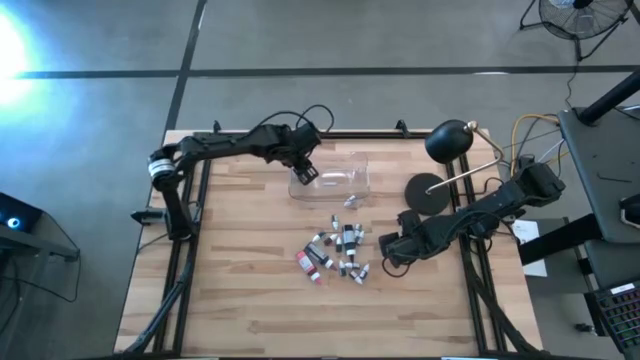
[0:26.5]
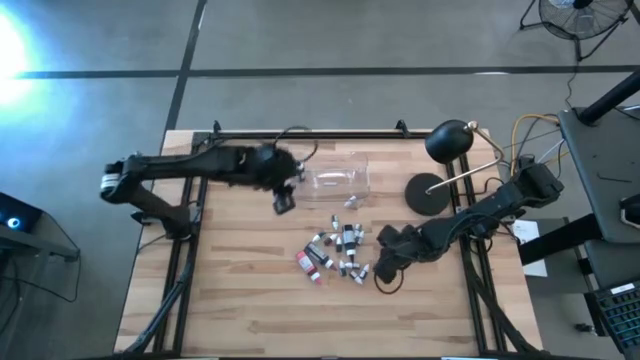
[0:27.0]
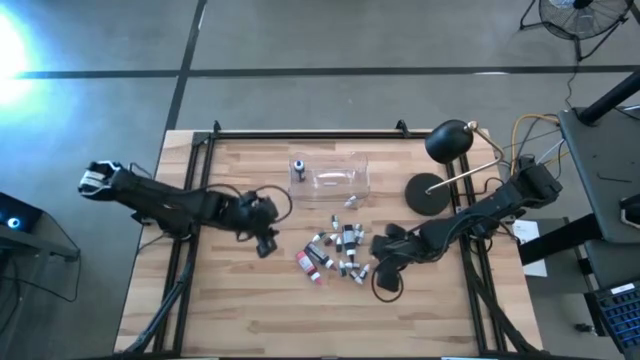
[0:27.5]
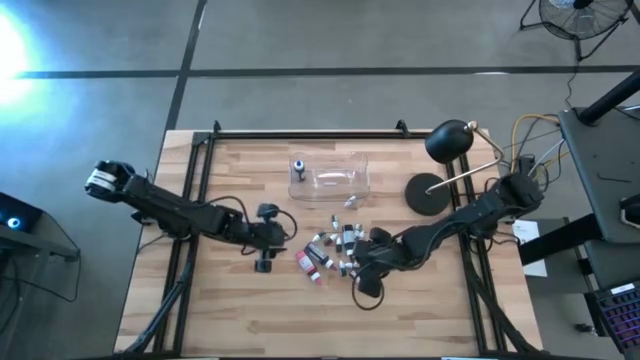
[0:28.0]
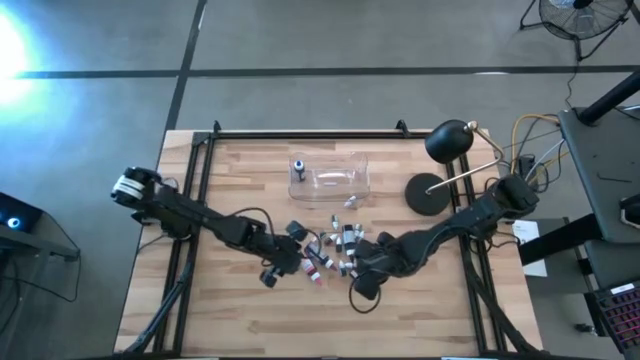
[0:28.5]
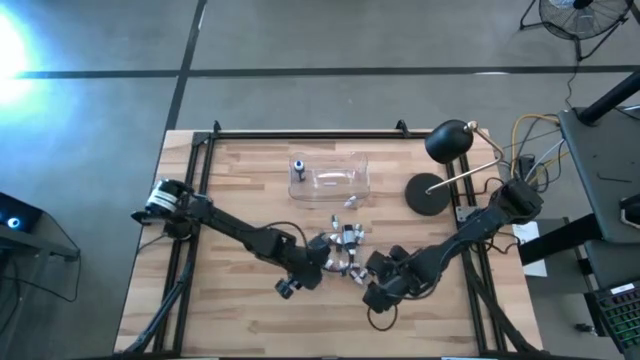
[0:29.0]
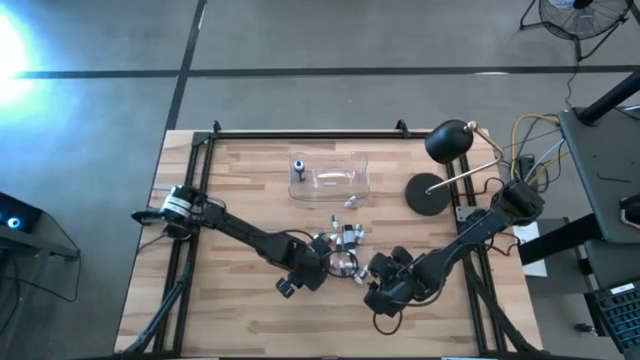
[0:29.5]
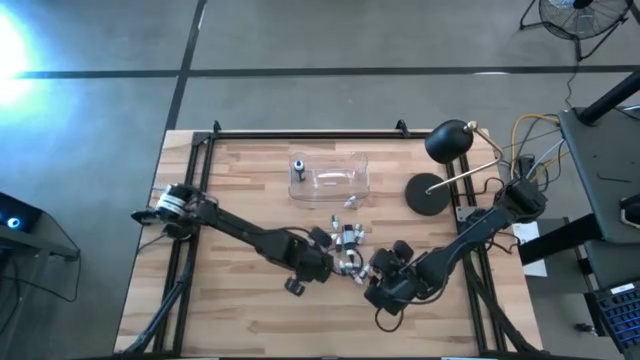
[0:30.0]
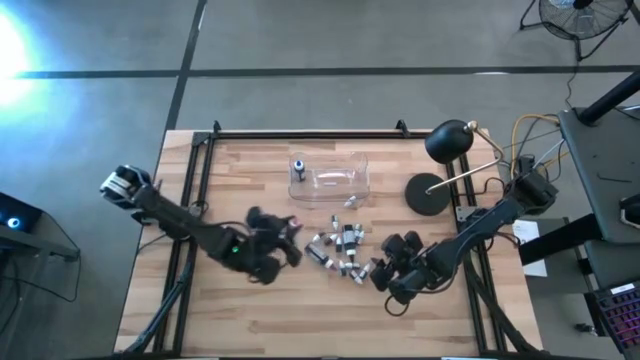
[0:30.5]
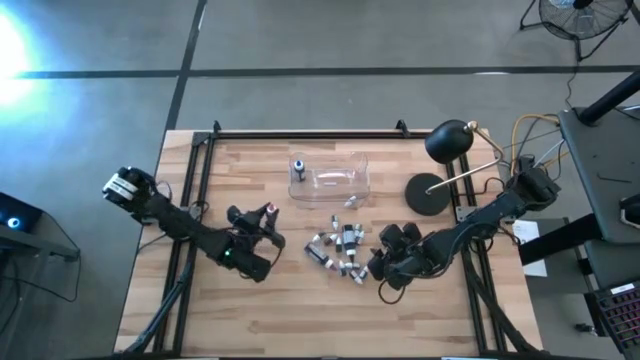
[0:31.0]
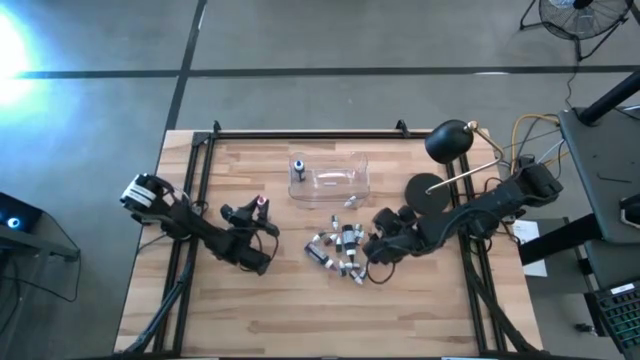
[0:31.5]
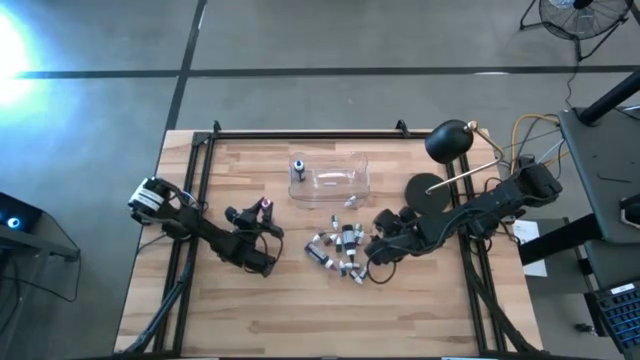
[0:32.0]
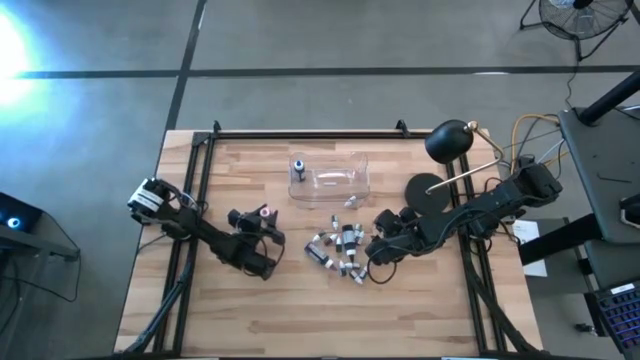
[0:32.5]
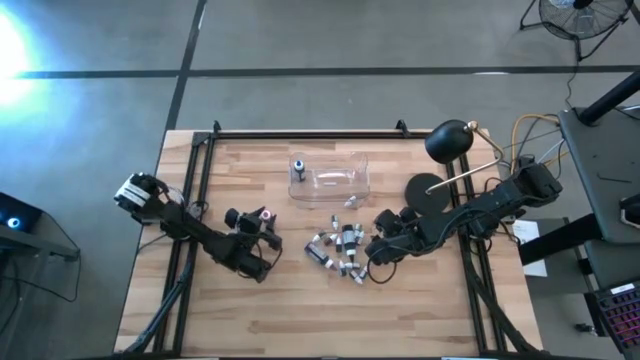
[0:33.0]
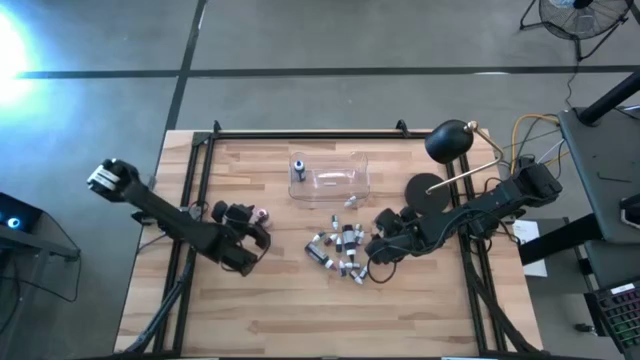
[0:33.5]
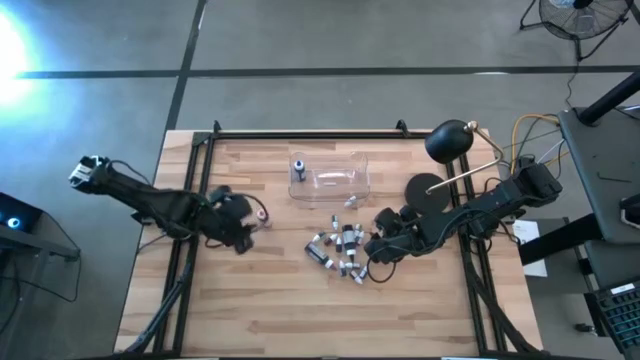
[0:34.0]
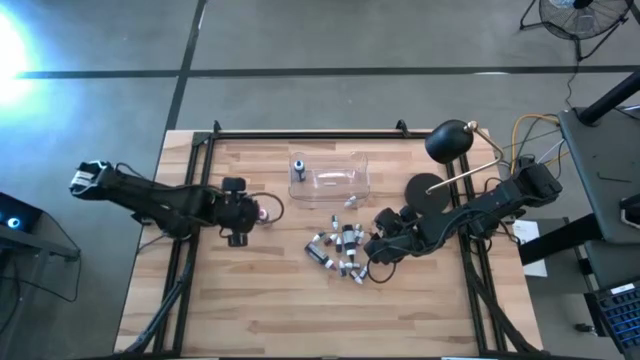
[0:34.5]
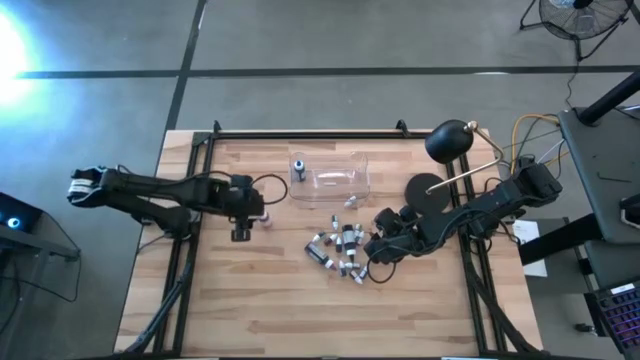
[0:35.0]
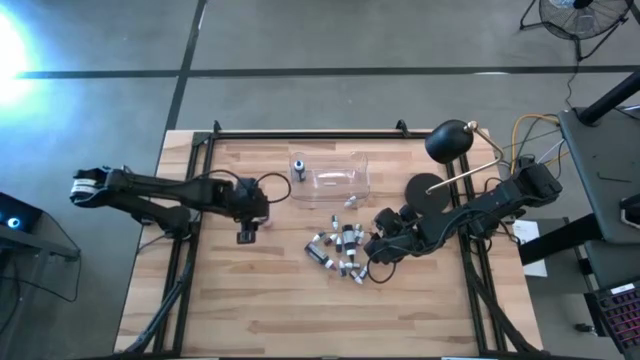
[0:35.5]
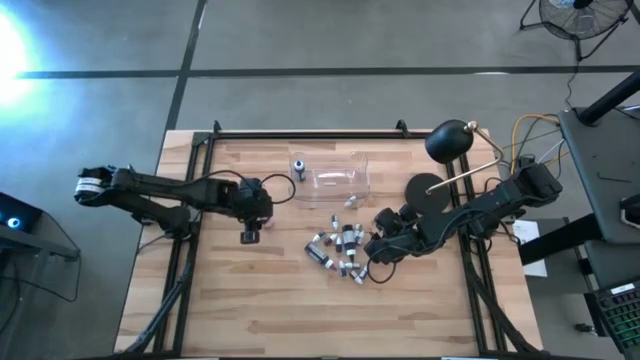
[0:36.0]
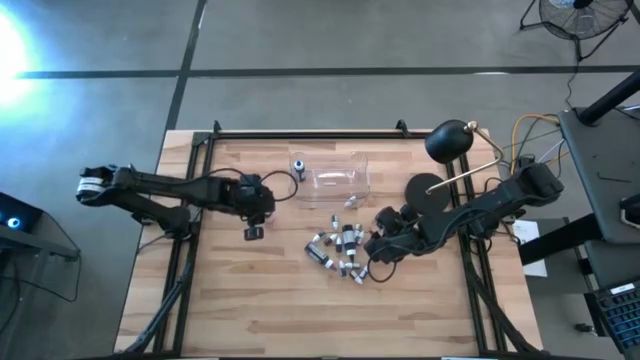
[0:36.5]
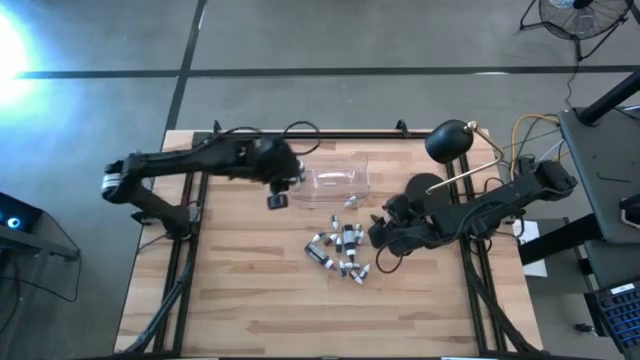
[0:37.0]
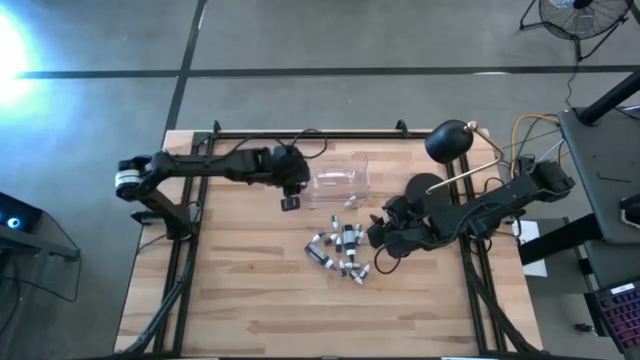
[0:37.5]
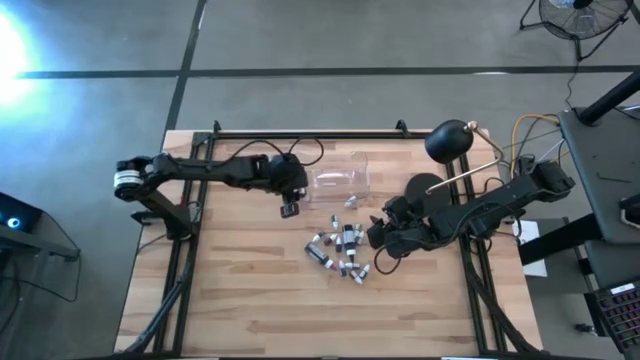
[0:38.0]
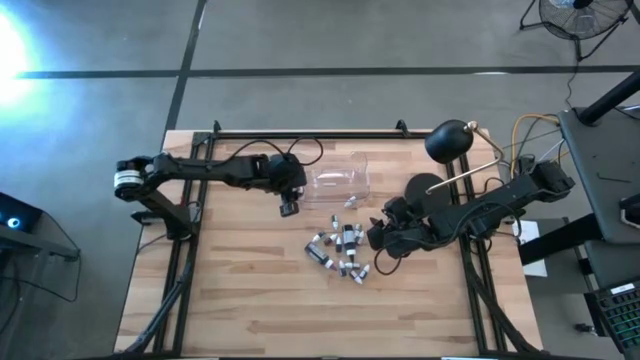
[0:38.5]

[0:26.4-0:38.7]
Task: Pick & Place food coloring
Put the large pink food coloring bottle into the transparent bin

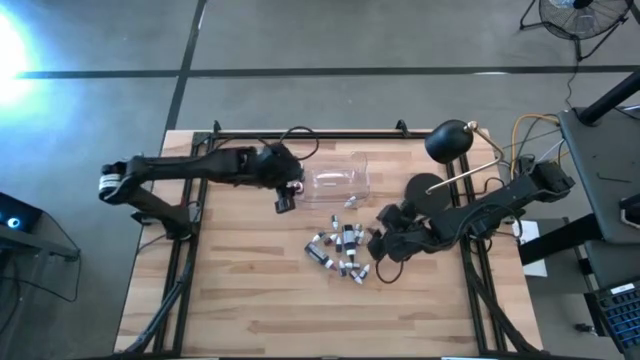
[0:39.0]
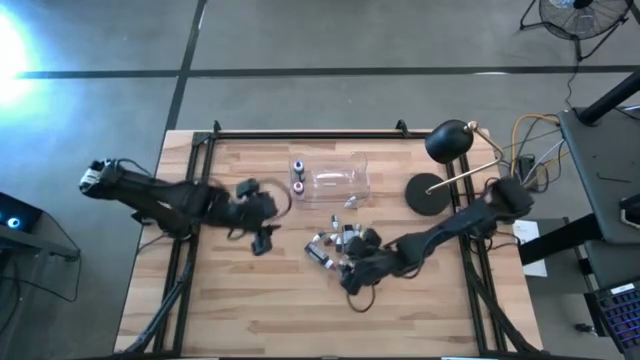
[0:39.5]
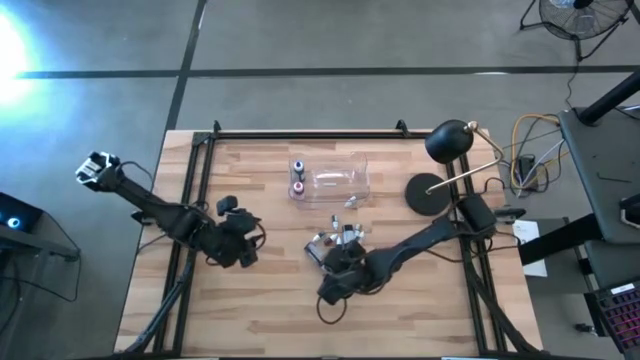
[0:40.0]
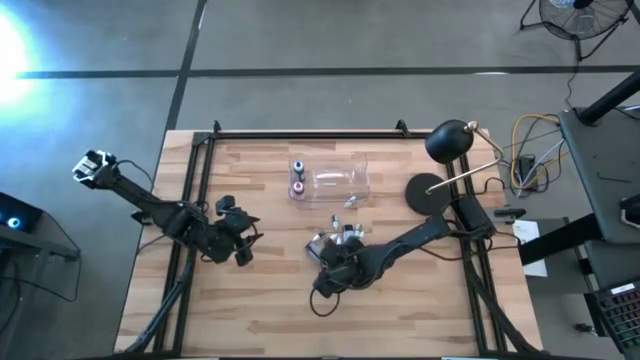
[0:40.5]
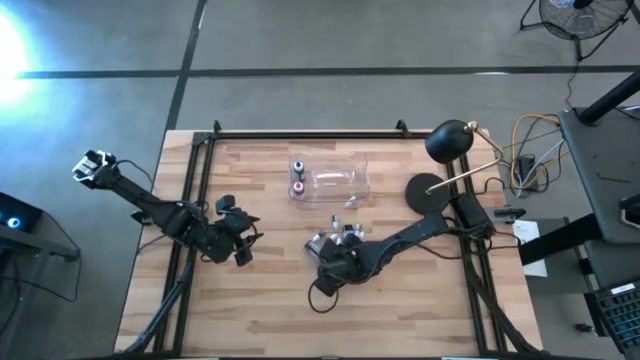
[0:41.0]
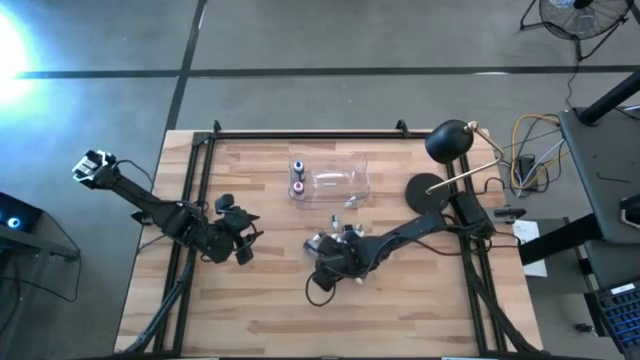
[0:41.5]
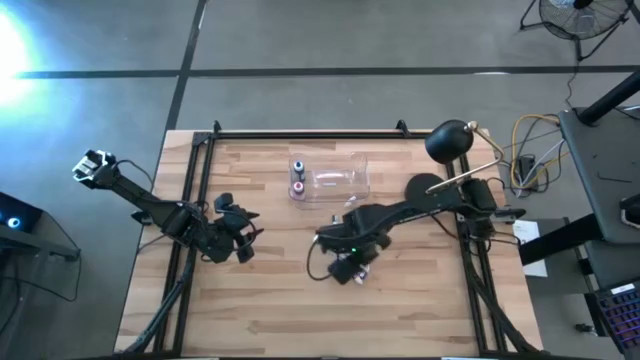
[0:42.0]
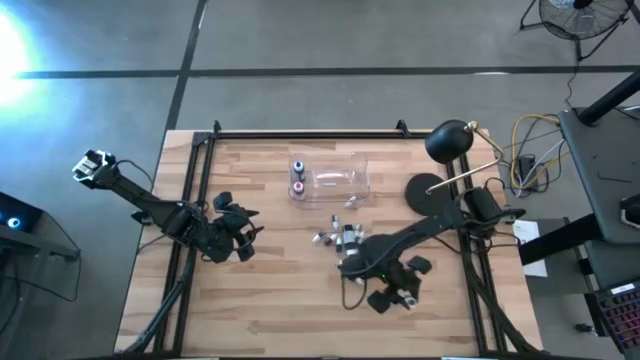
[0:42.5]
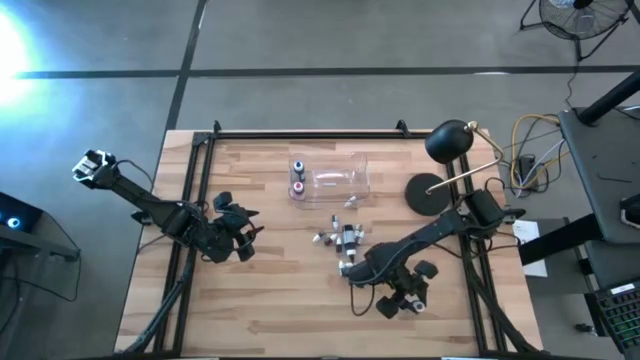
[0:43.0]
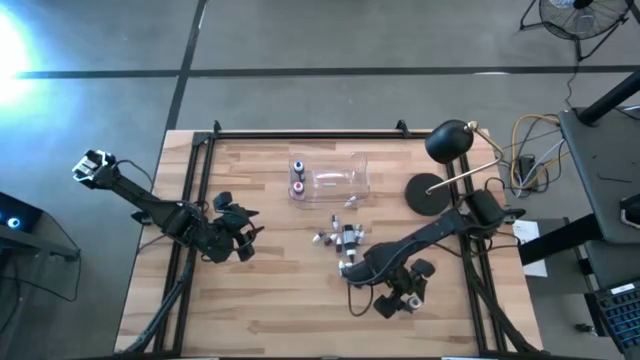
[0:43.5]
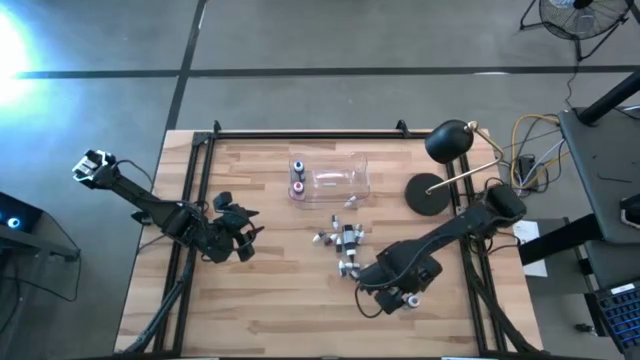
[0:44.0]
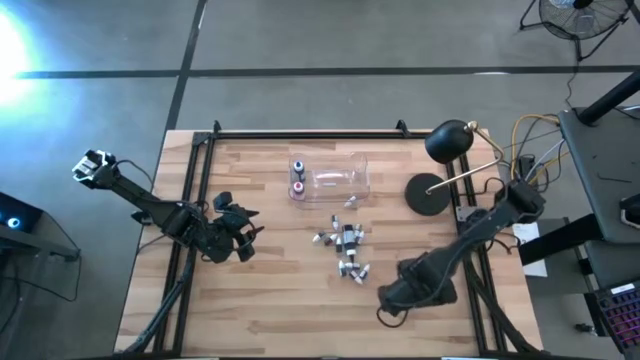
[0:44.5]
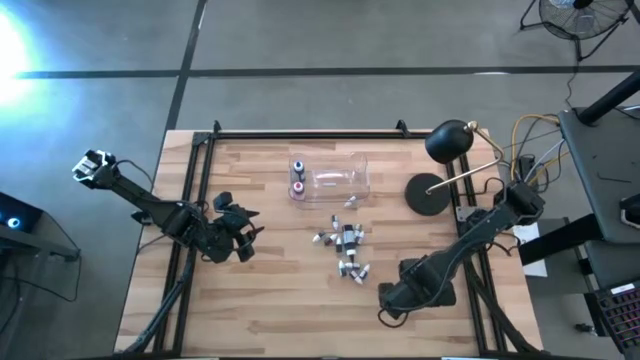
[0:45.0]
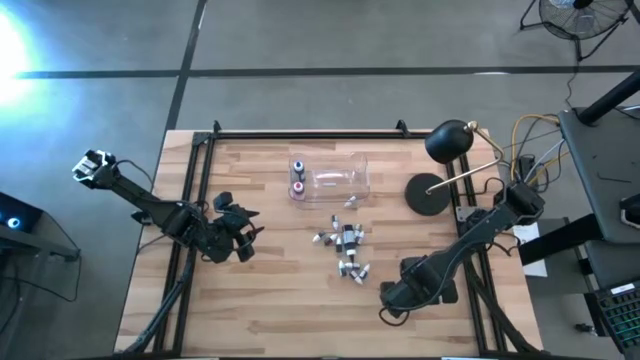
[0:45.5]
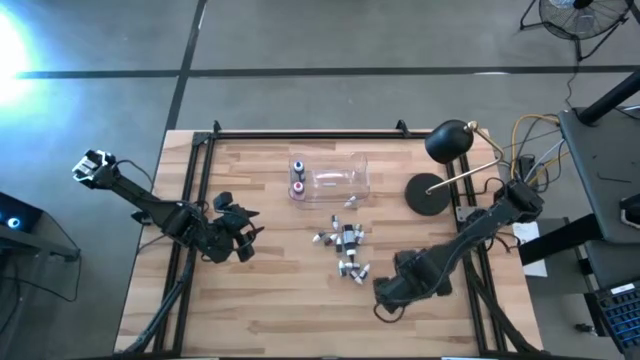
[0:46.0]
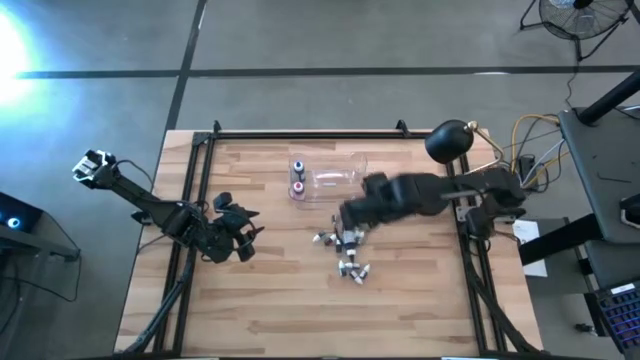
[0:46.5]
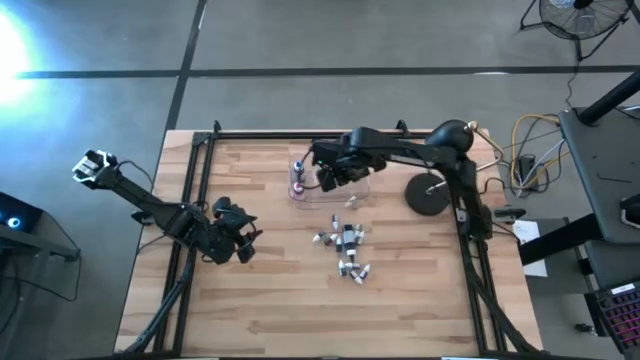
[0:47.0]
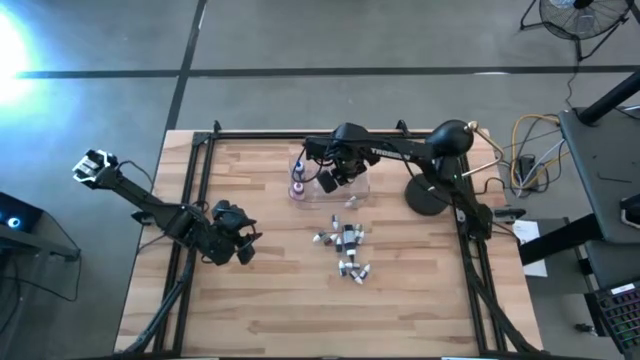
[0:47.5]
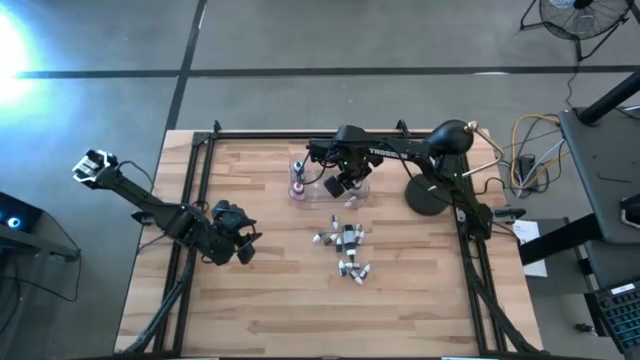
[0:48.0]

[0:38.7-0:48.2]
Put the large purple food coloring bottle into the transparent bin
